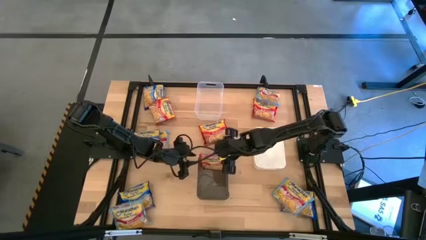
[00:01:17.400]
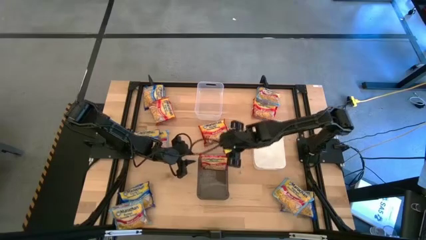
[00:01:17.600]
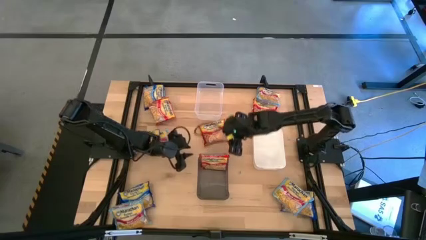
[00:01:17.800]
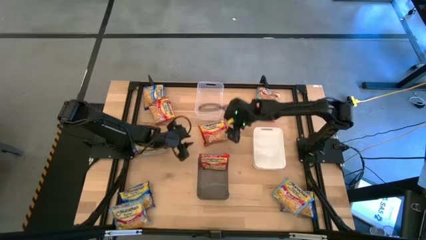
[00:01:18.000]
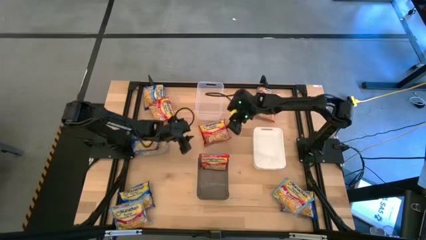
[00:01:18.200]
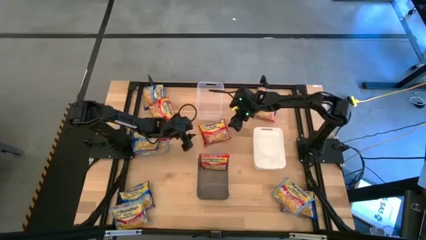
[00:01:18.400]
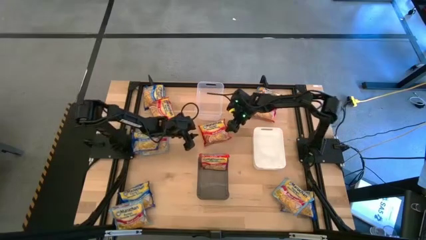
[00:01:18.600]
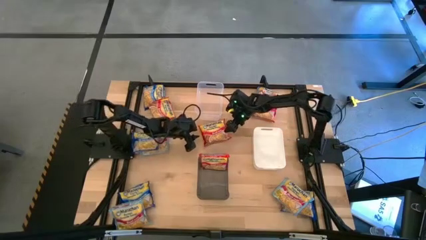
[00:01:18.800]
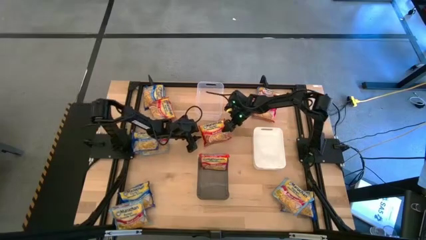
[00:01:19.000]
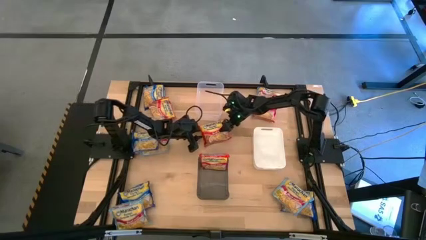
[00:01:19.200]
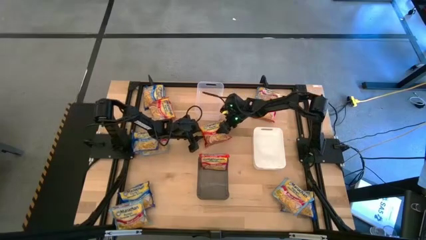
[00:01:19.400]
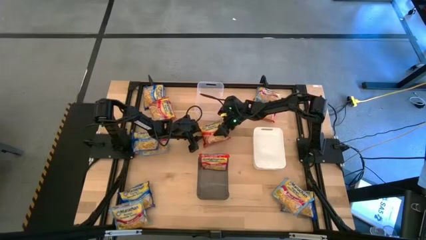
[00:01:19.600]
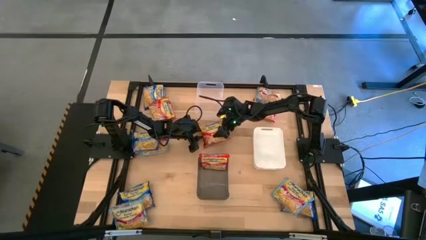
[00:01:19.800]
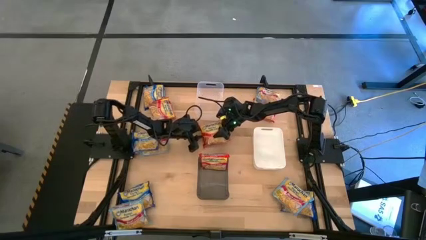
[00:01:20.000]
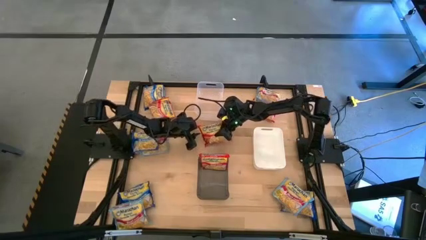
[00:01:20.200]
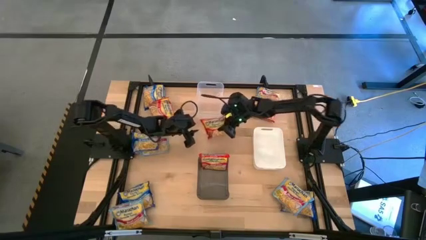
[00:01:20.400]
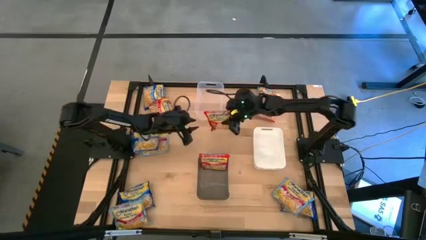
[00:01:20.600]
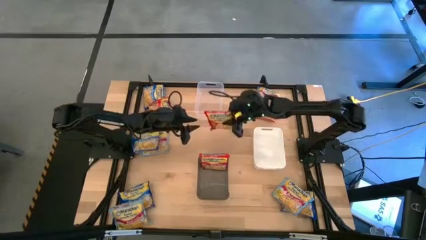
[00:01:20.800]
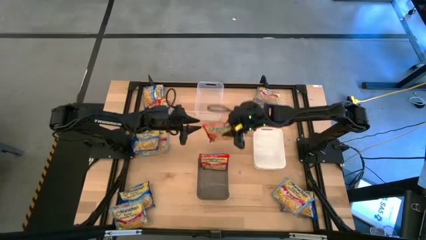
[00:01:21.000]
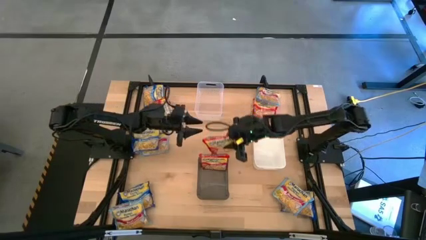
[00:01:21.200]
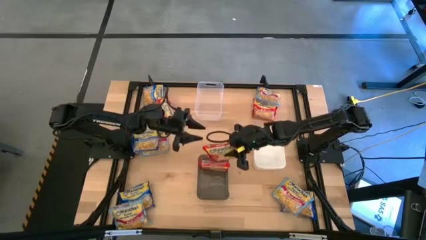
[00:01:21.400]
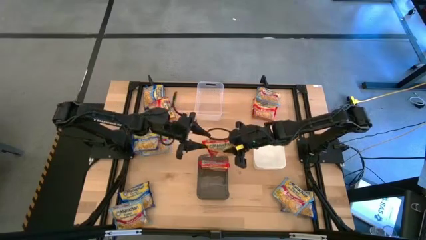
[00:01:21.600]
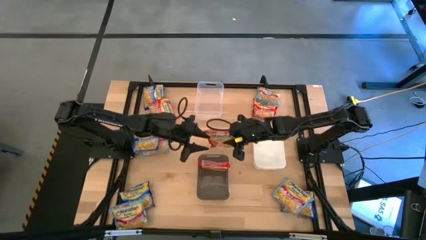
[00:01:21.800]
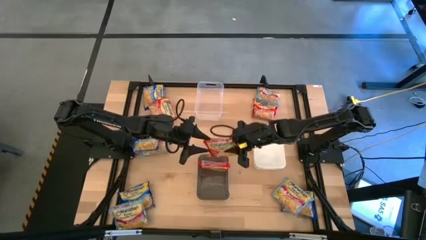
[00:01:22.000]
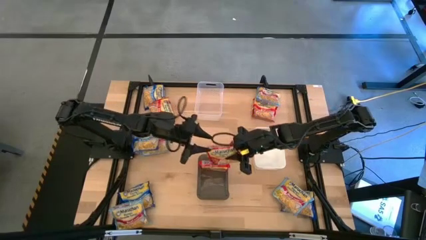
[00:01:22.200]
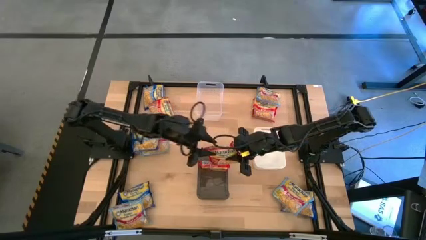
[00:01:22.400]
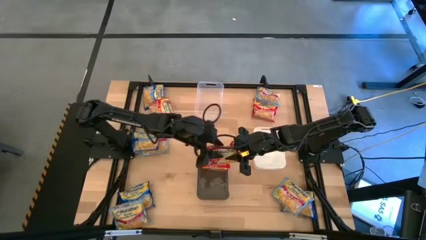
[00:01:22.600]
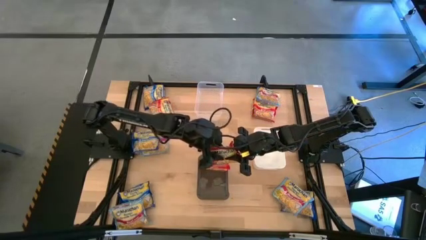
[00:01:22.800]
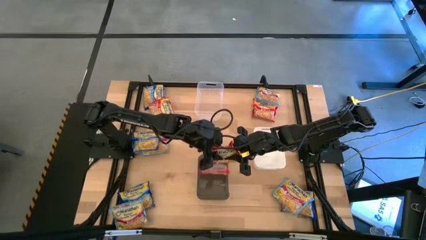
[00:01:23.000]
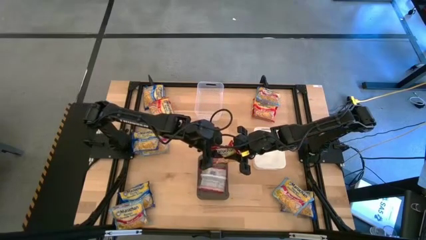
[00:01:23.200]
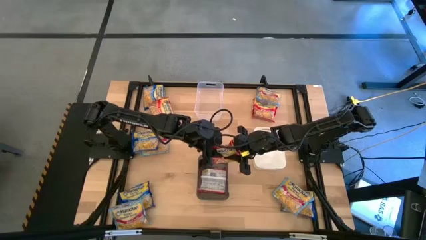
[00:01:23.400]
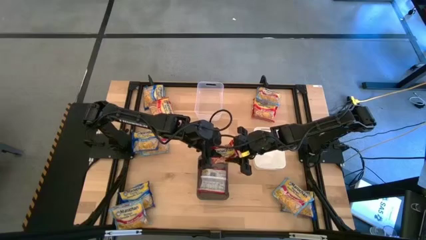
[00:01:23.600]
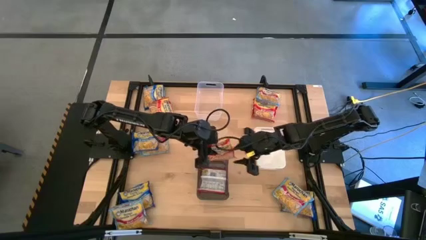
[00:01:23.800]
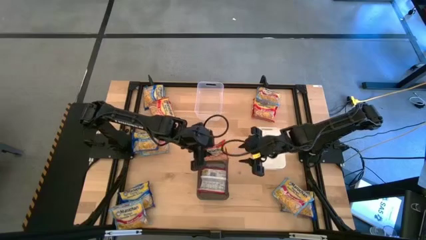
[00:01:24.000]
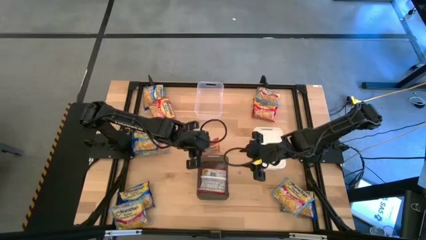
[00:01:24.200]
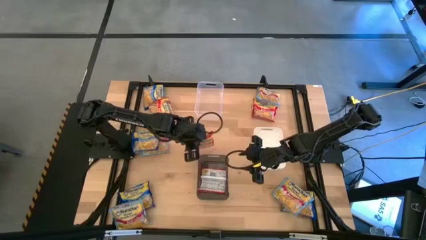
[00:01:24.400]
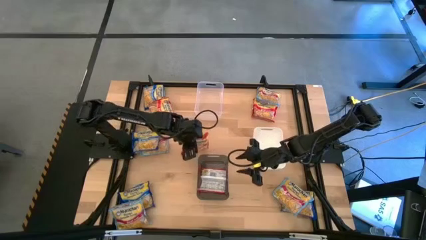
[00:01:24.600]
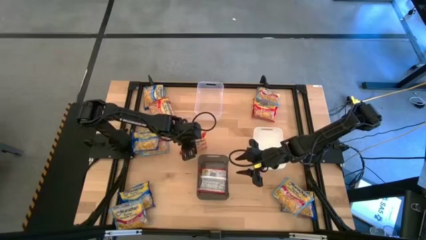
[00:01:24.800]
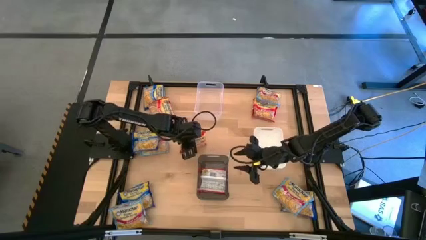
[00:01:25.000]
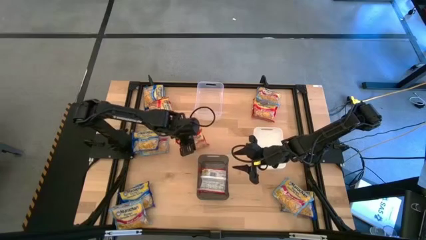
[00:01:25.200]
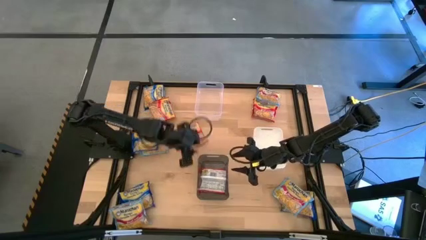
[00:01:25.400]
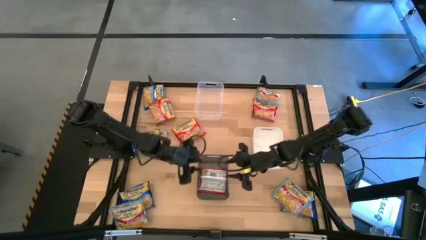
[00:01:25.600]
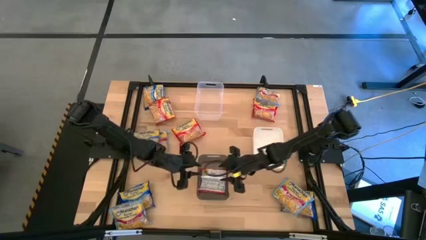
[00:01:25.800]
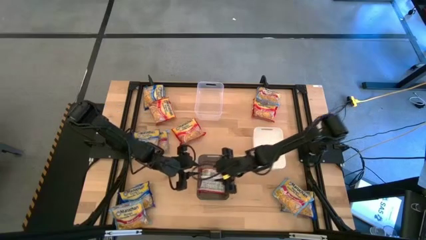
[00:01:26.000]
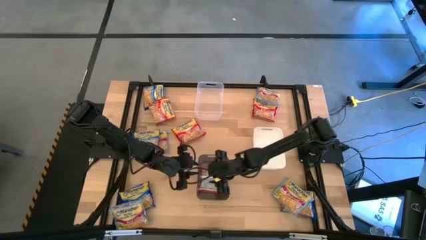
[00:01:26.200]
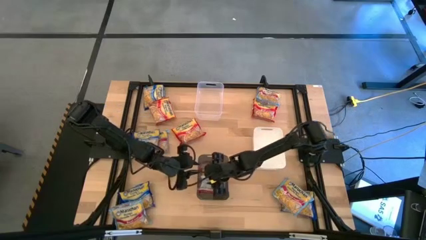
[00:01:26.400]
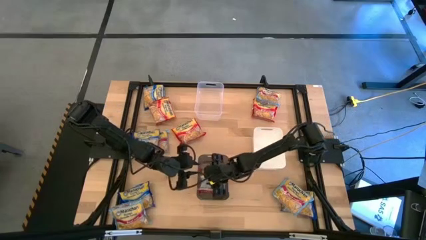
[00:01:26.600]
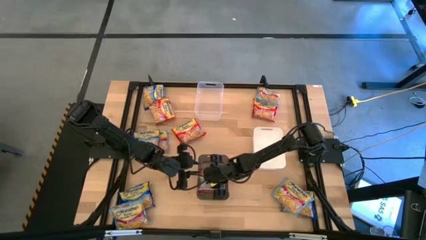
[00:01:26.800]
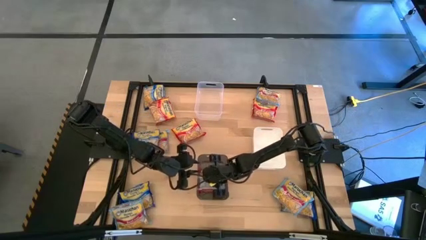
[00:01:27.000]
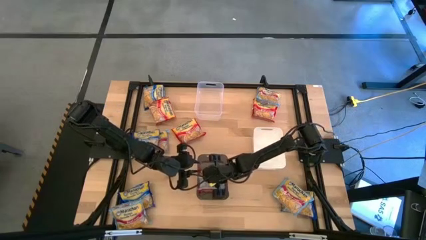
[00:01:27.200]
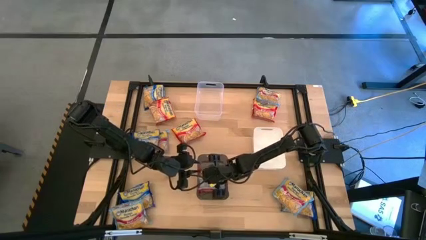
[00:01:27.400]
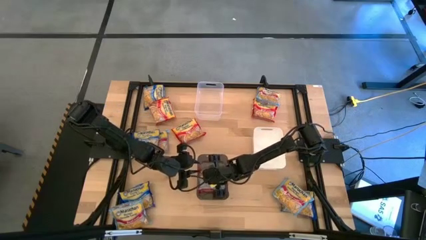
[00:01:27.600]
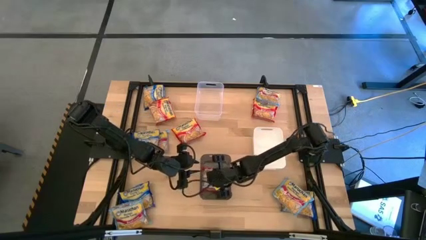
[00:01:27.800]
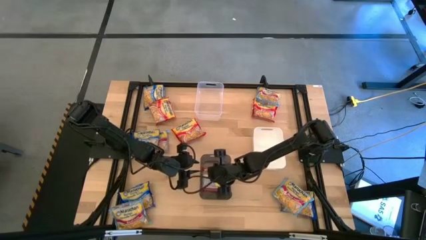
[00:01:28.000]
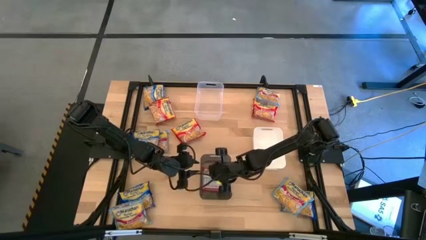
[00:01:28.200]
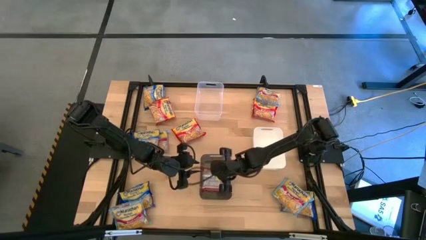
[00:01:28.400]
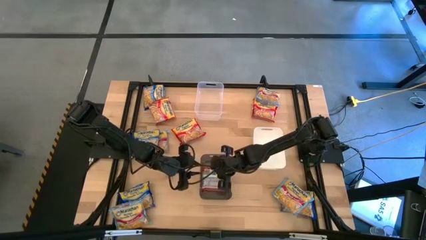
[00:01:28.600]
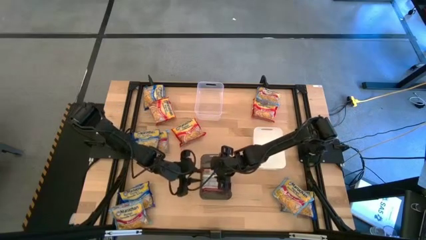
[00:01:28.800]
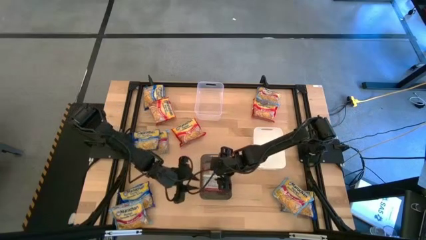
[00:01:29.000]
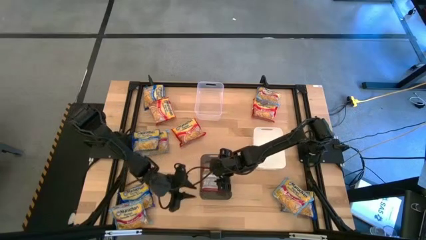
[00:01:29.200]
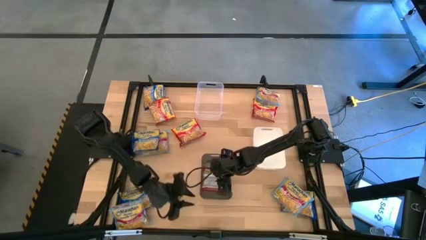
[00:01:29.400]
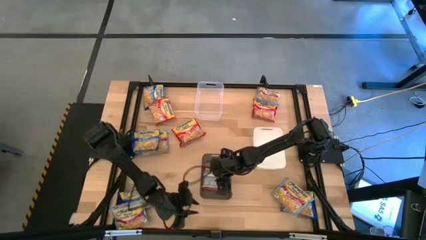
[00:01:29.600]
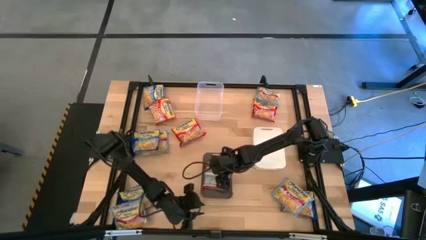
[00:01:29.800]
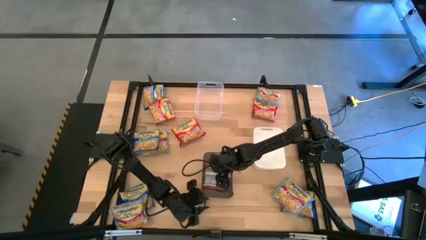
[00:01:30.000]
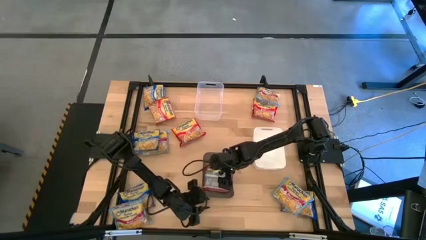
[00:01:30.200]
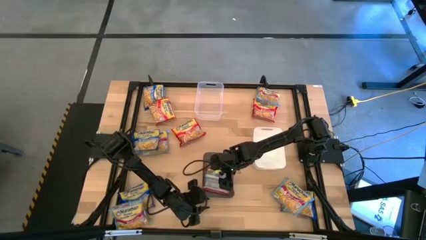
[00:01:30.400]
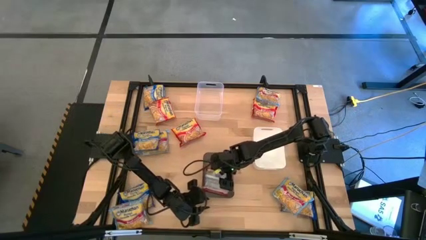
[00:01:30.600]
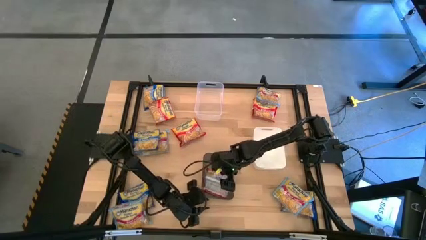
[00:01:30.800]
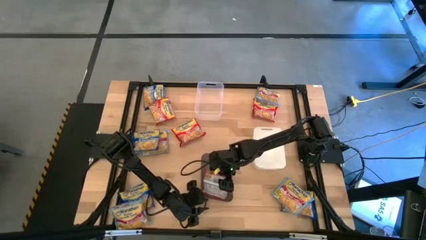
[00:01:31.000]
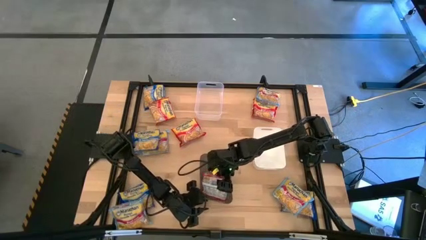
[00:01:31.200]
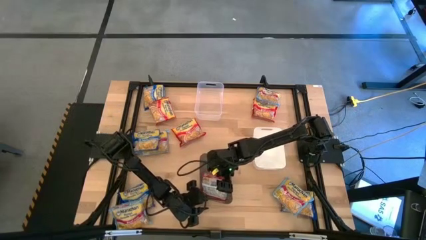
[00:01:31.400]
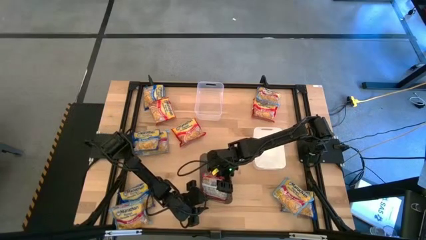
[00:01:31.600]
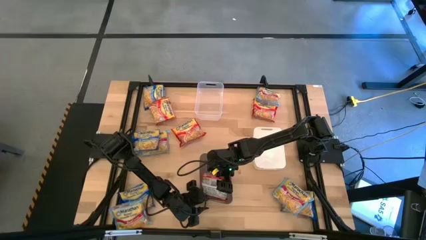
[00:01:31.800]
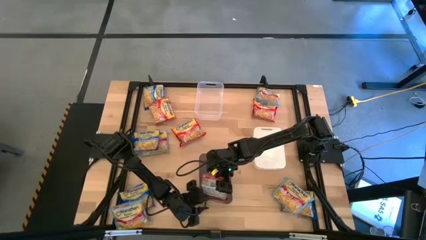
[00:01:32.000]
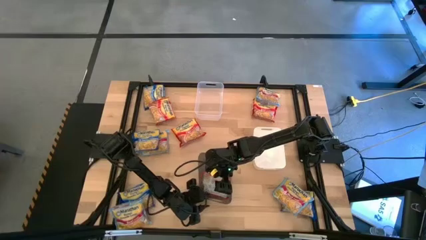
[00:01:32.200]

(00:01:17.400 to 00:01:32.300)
Task: Sort Maruchan noodles
Put the red noodle pack into the gray bin

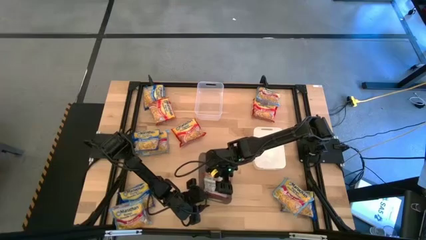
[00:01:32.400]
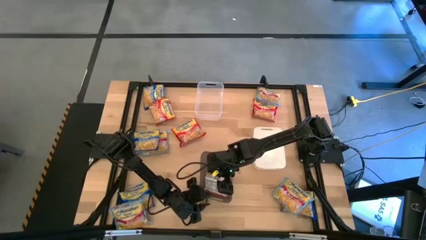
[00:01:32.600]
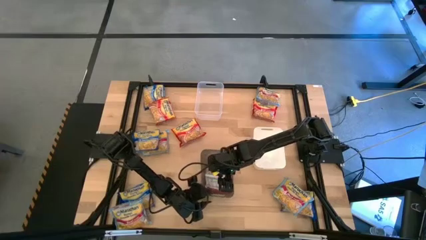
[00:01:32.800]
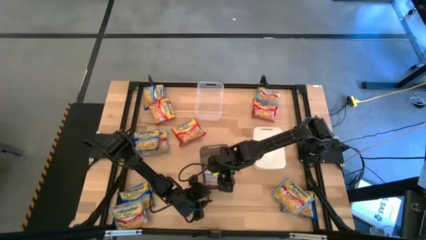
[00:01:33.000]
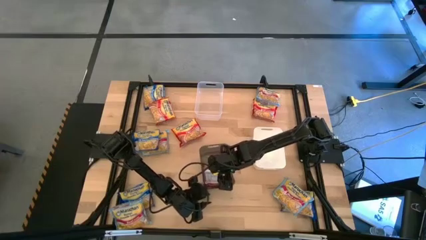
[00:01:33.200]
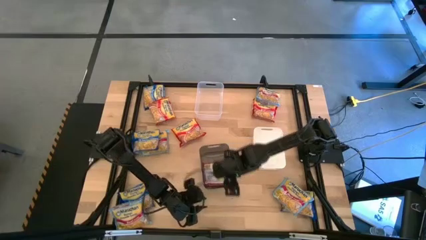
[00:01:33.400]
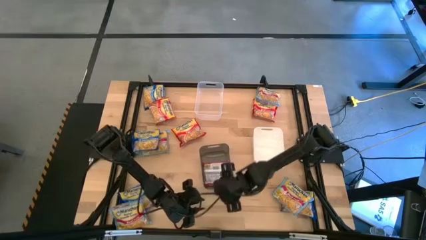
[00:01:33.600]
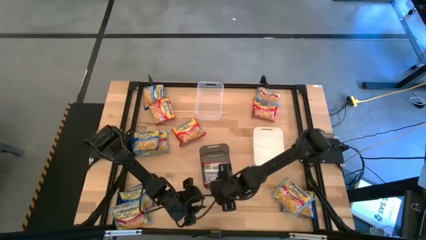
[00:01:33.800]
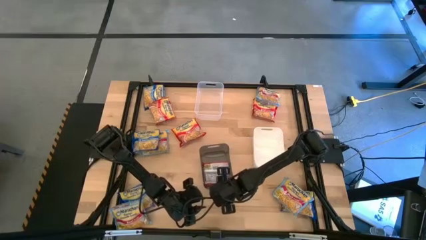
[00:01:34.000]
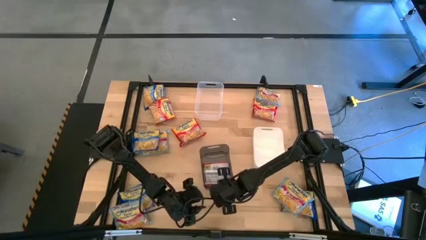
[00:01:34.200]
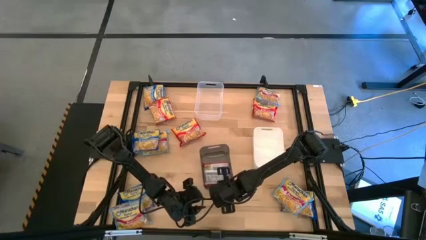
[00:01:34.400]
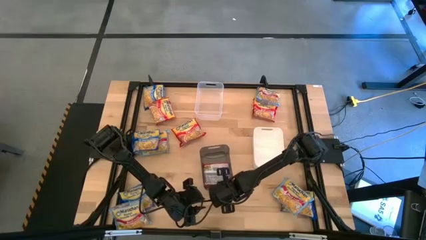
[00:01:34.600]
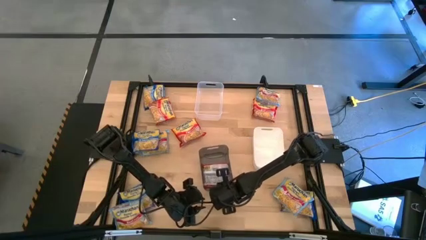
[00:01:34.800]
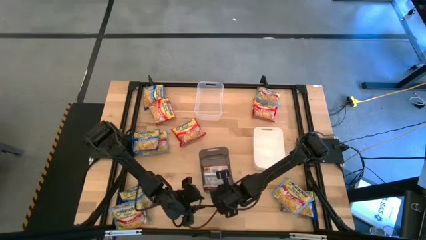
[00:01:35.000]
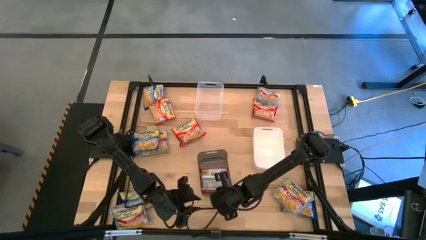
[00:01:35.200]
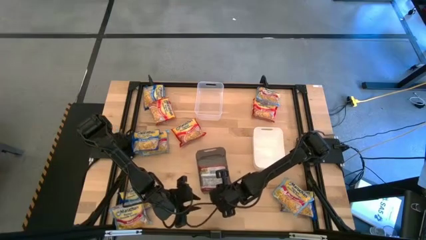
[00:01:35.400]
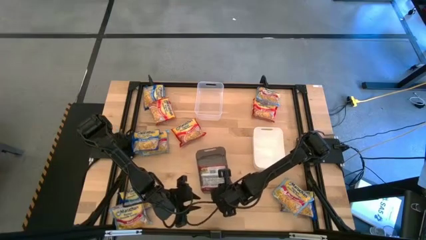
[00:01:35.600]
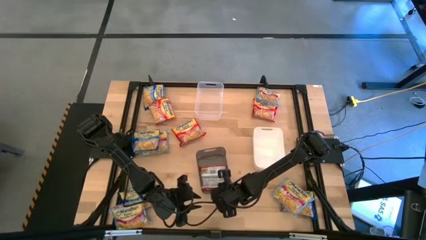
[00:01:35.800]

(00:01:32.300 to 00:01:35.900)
Adjust the gray bin on the table
